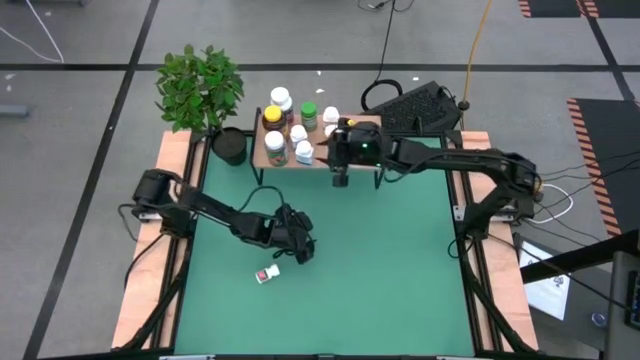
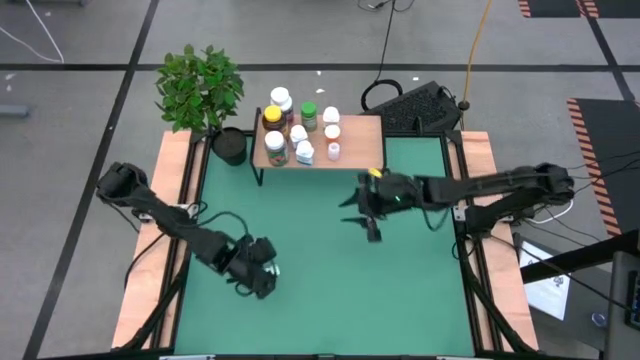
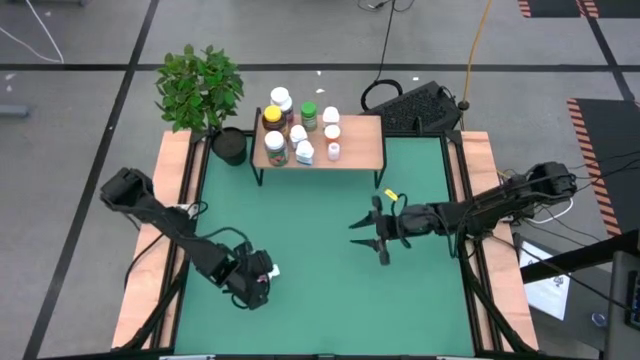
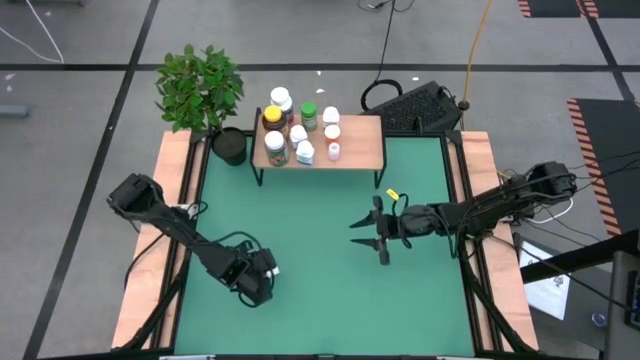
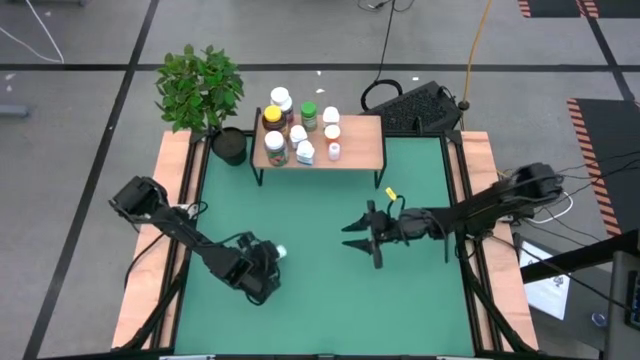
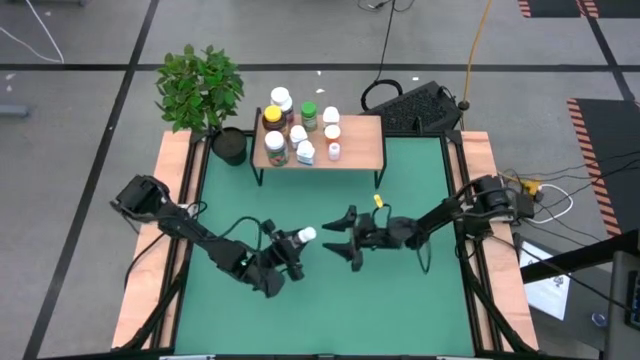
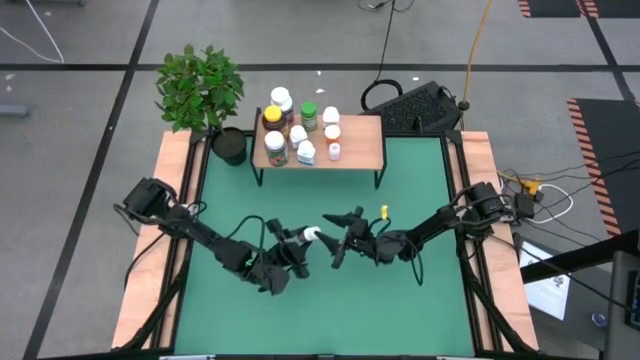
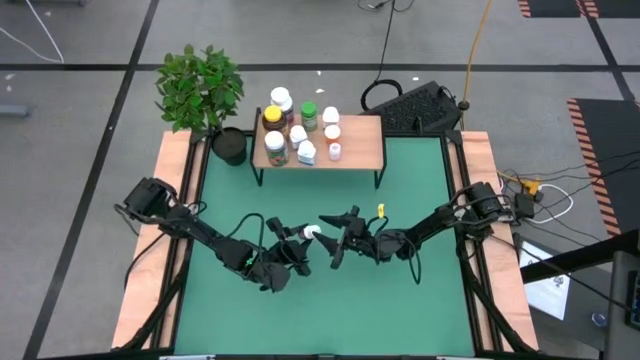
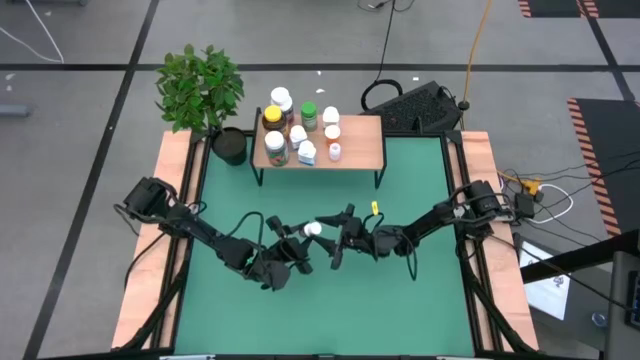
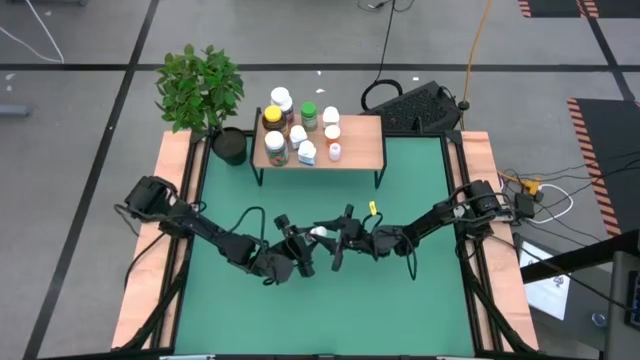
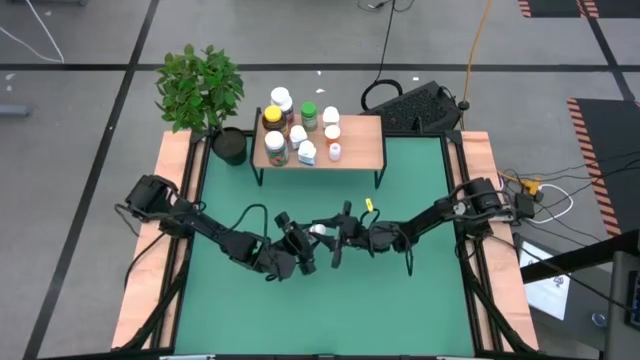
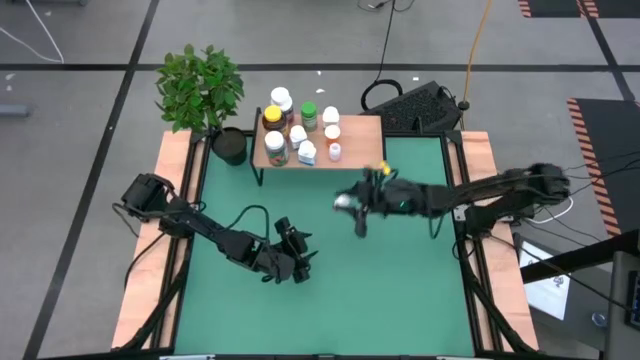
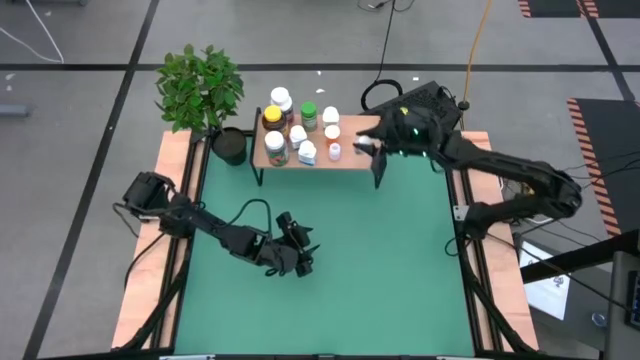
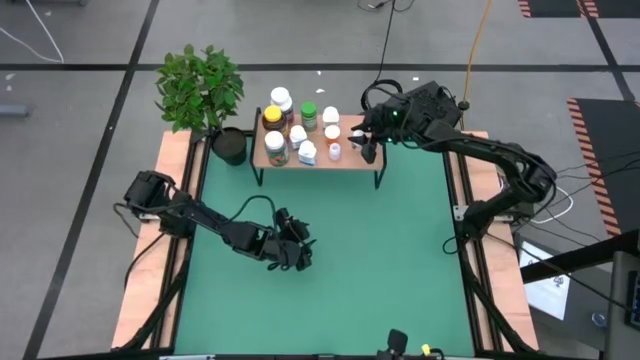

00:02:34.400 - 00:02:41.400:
Task: Pick and place medicine bottles onto shelf by color
Put the black pill bottle on the shelf

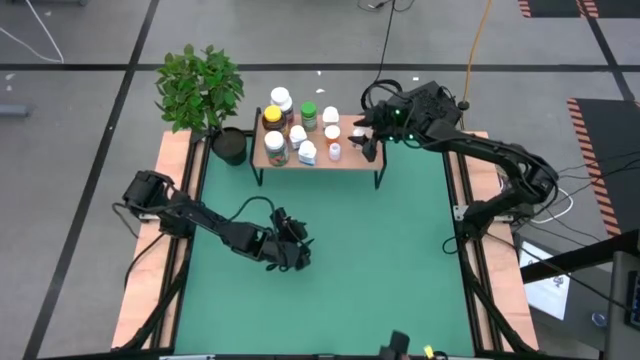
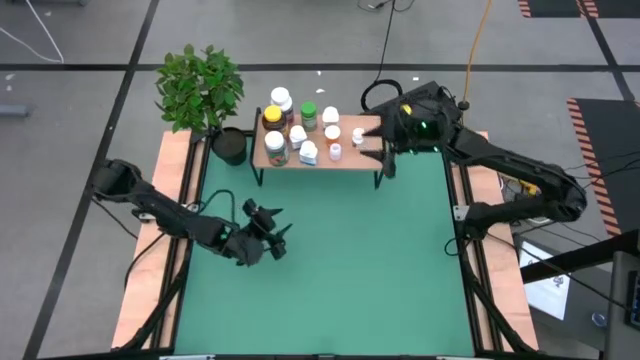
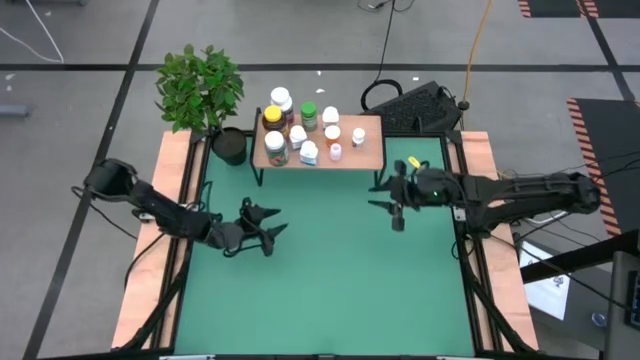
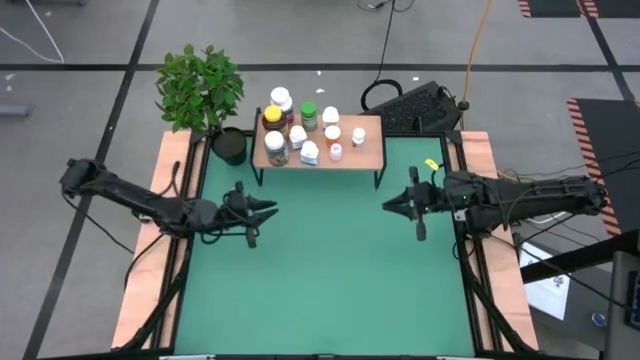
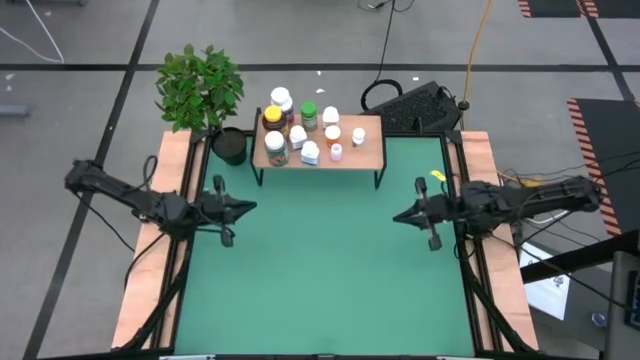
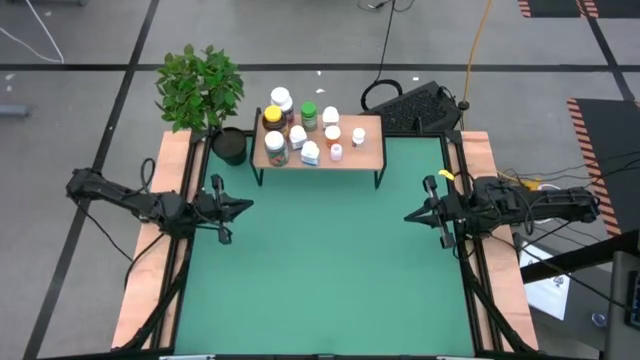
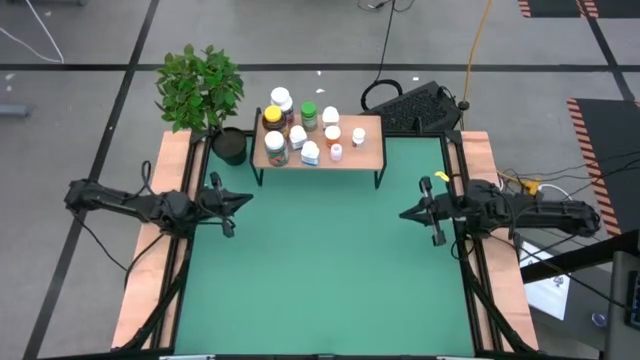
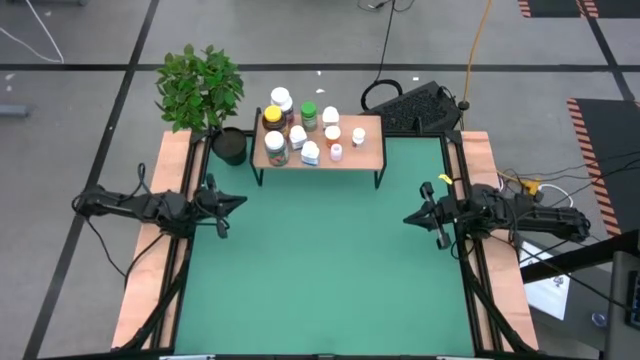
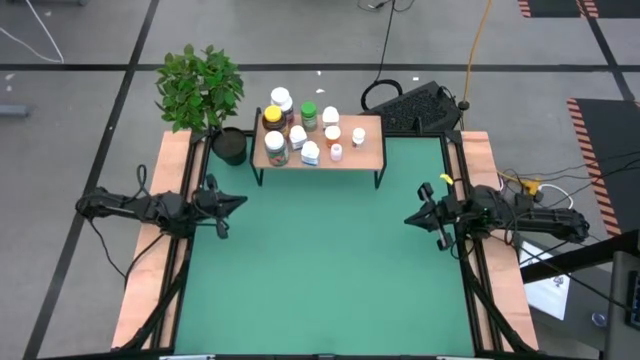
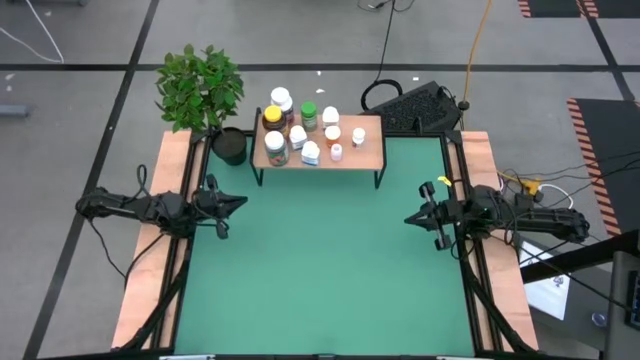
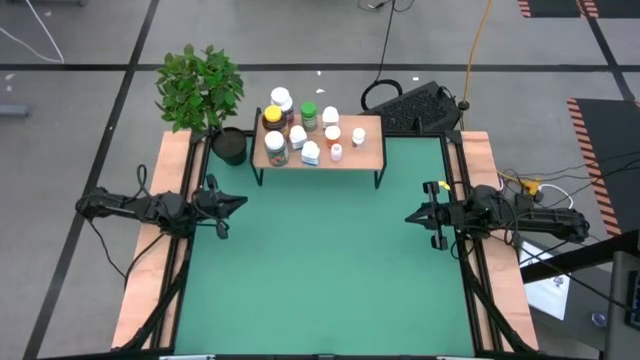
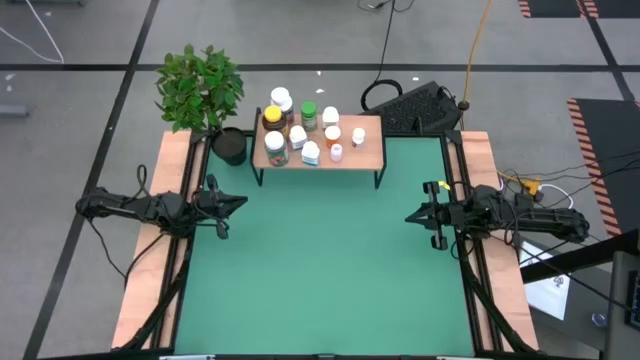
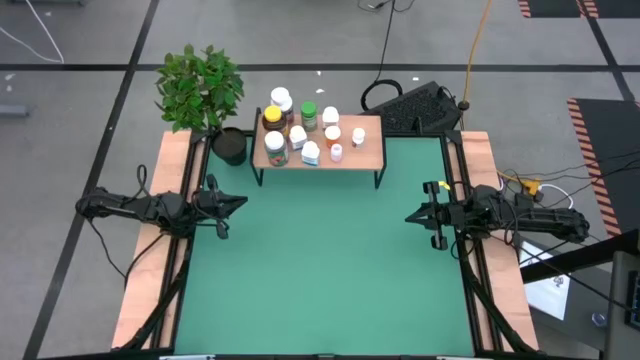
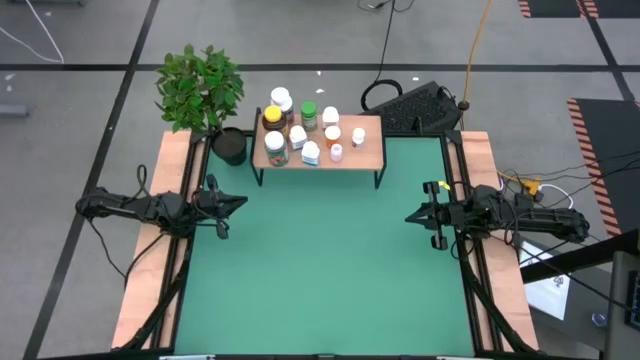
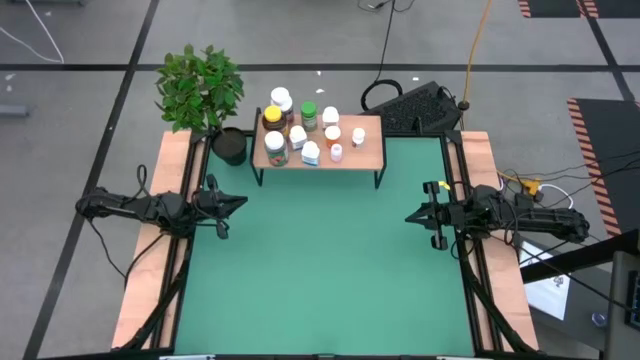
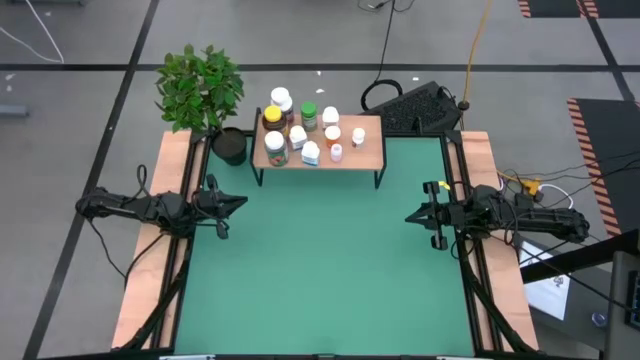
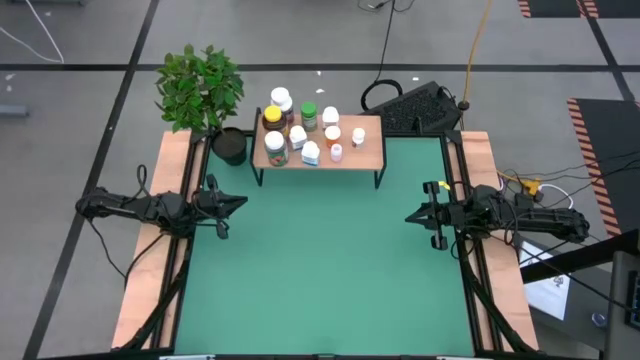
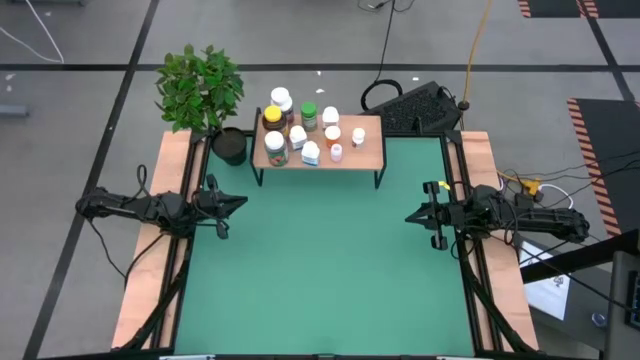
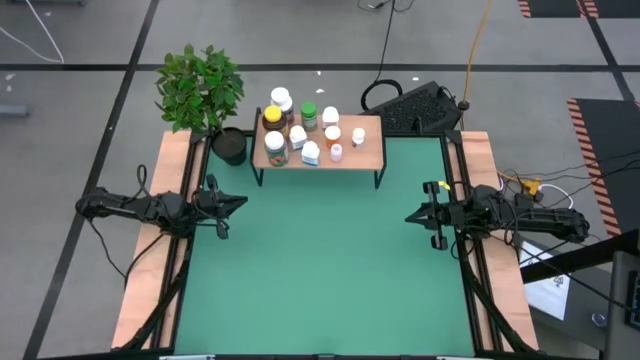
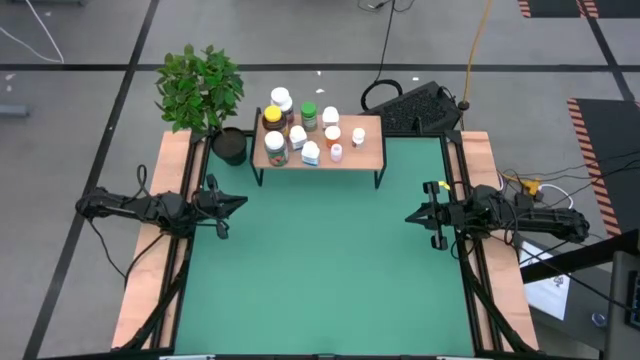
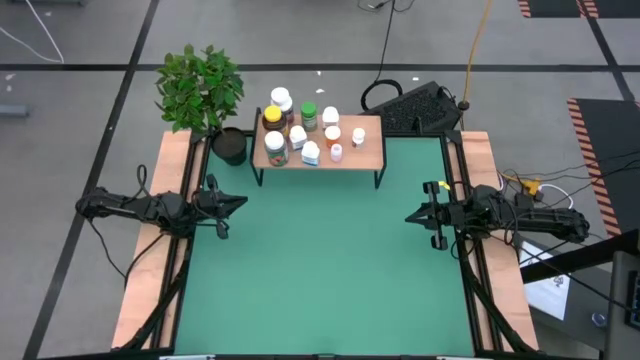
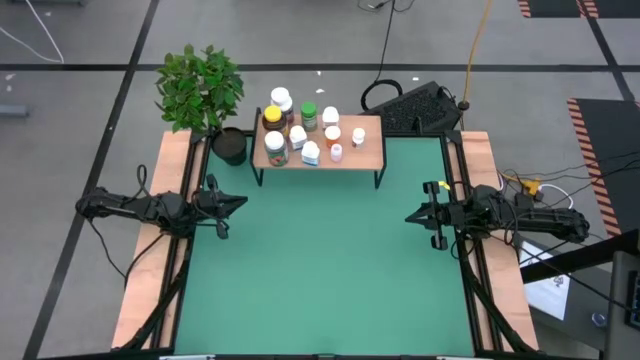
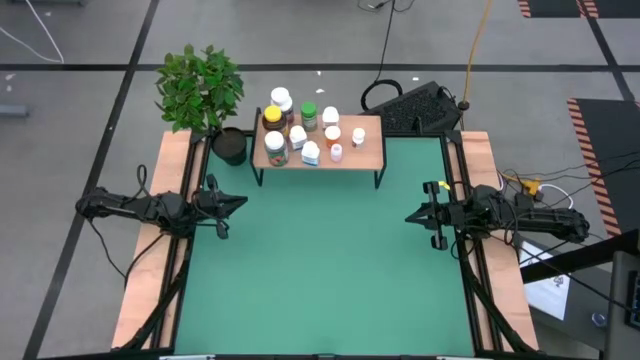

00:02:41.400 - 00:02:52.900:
Return to Home Position

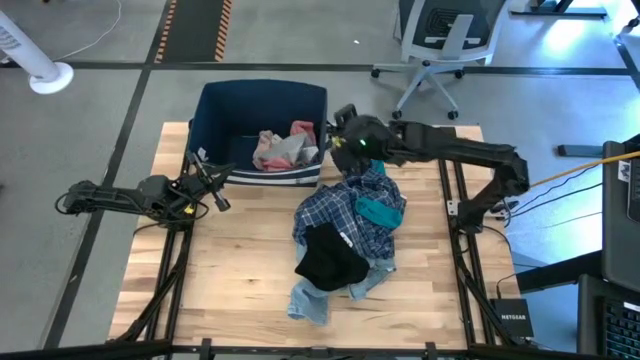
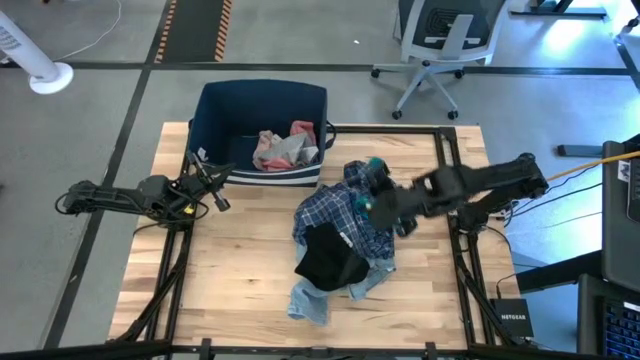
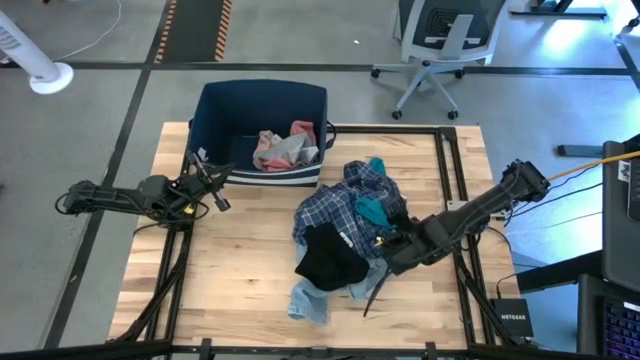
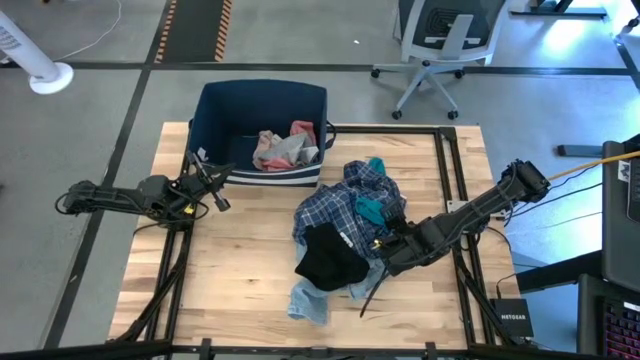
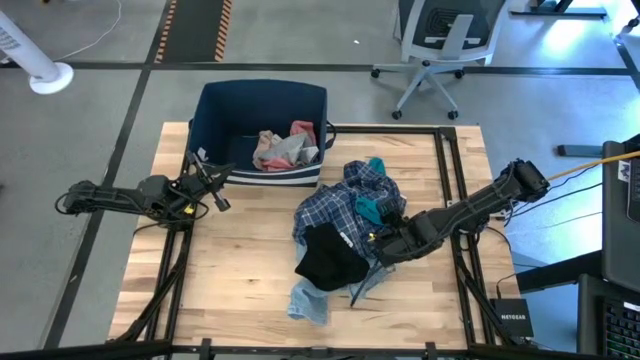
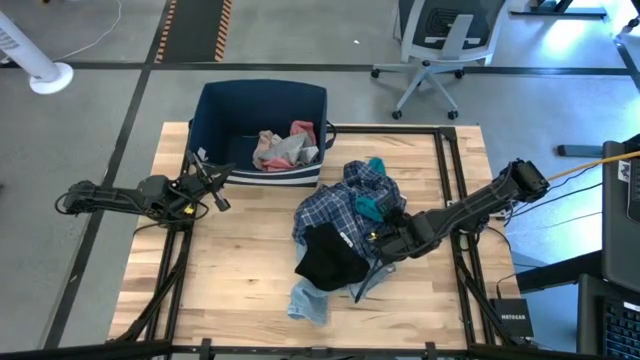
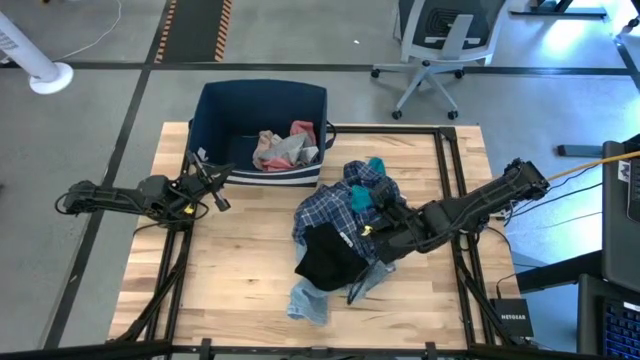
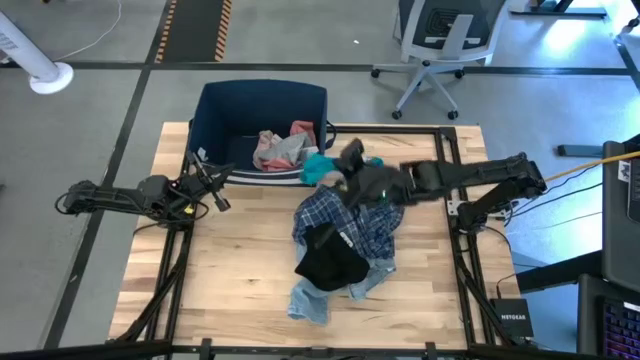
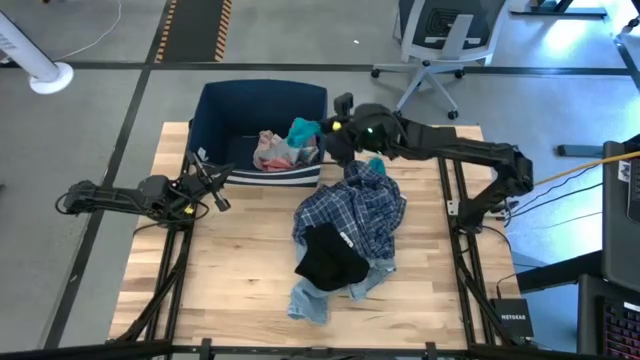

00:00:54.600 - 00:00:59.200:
Task: Sort clothes
Put the blue sock into the blue laundry bin
